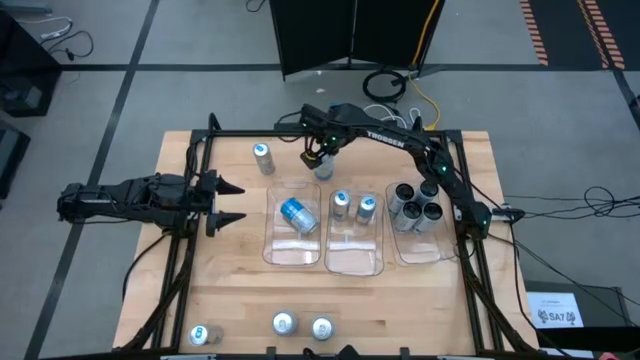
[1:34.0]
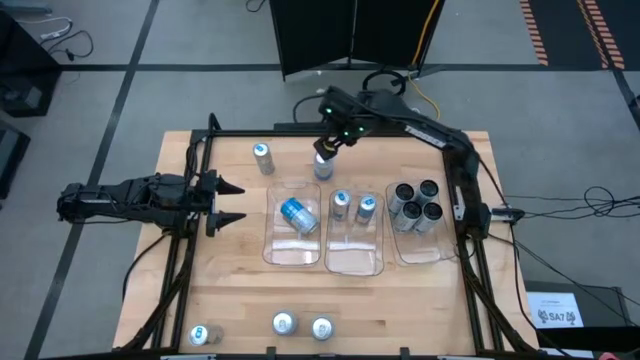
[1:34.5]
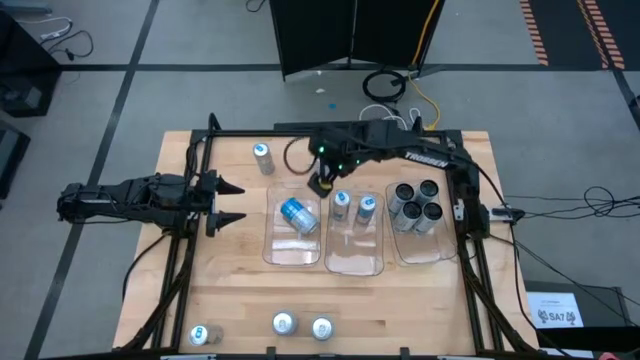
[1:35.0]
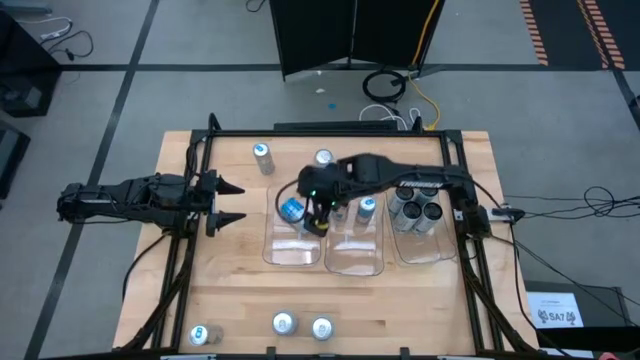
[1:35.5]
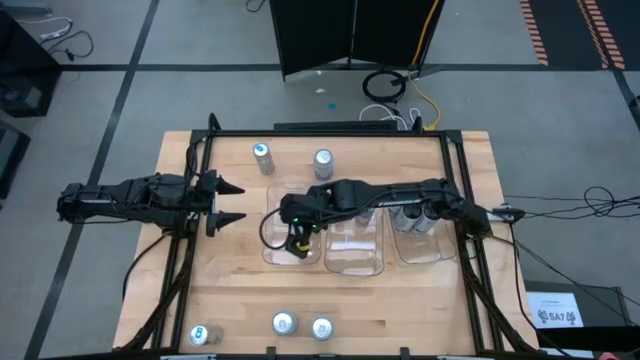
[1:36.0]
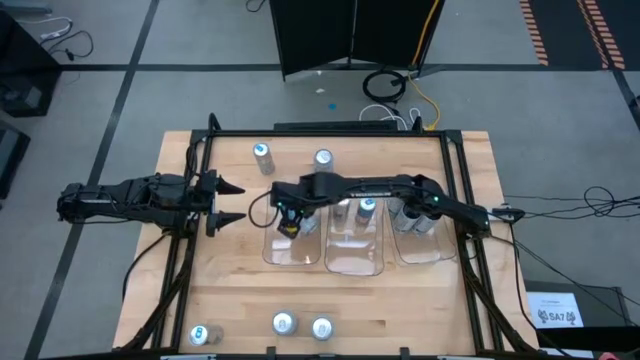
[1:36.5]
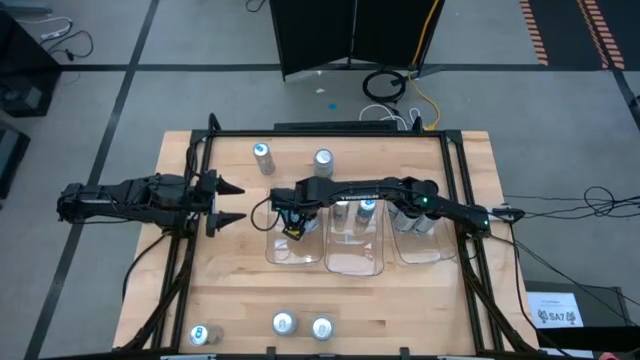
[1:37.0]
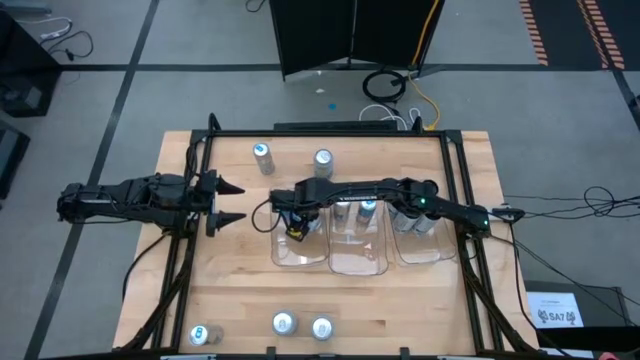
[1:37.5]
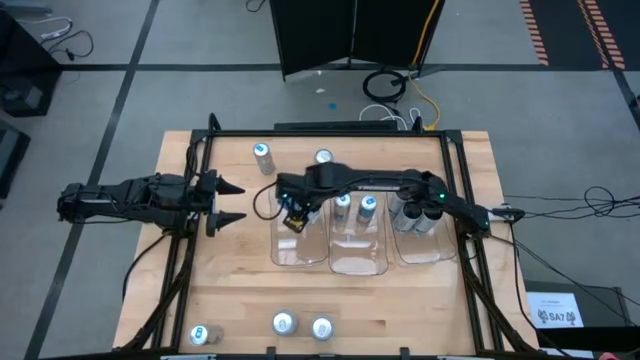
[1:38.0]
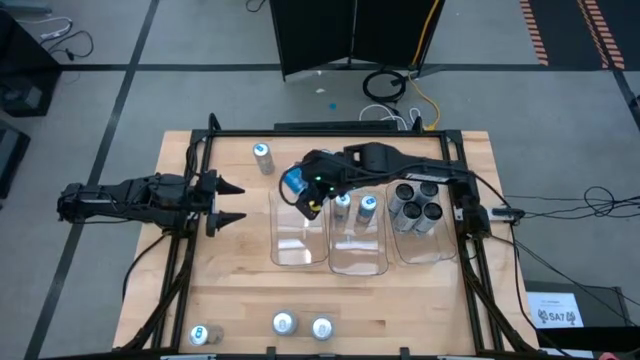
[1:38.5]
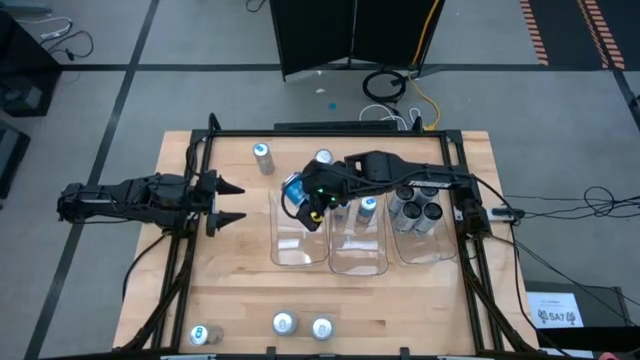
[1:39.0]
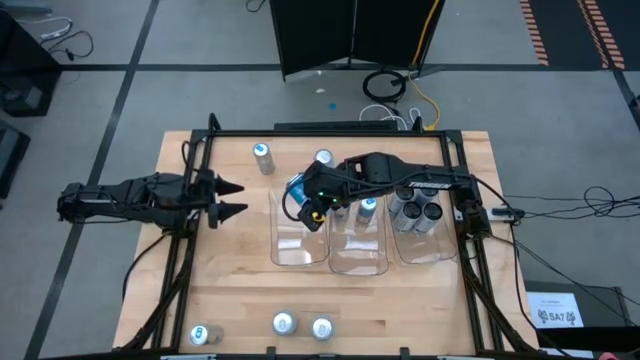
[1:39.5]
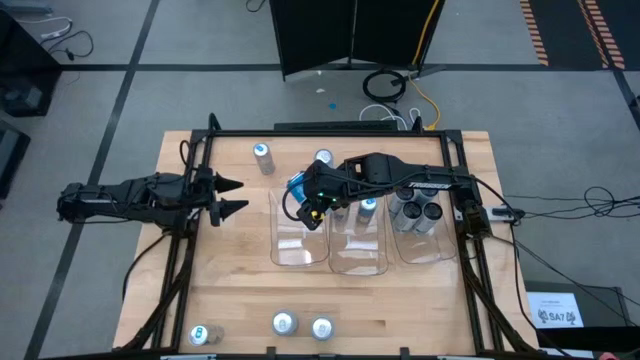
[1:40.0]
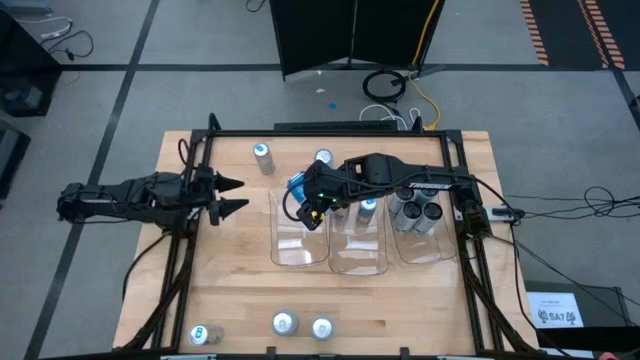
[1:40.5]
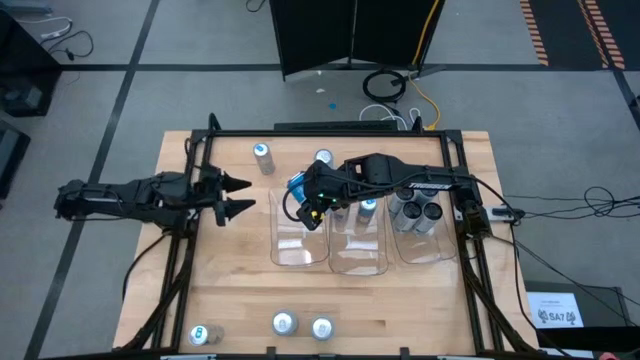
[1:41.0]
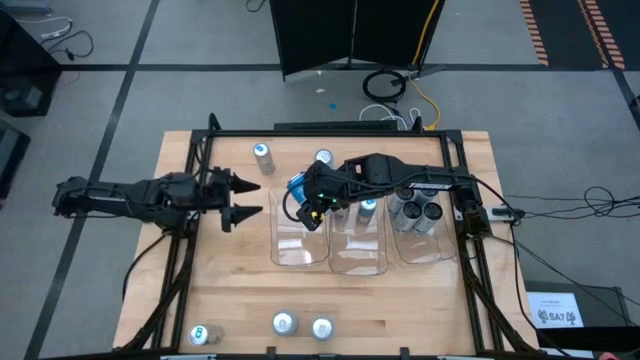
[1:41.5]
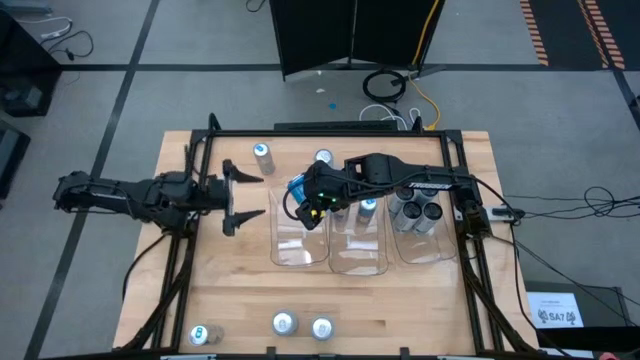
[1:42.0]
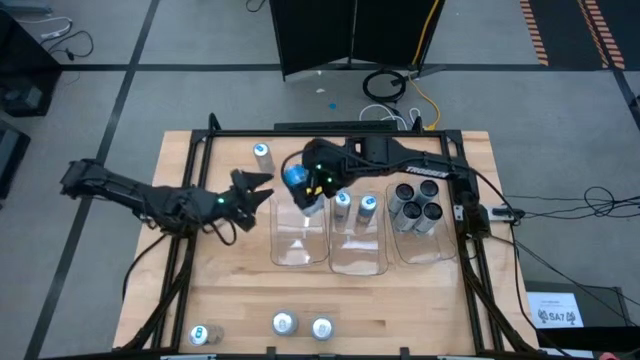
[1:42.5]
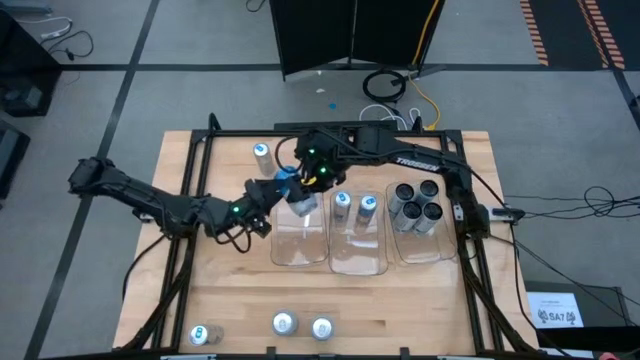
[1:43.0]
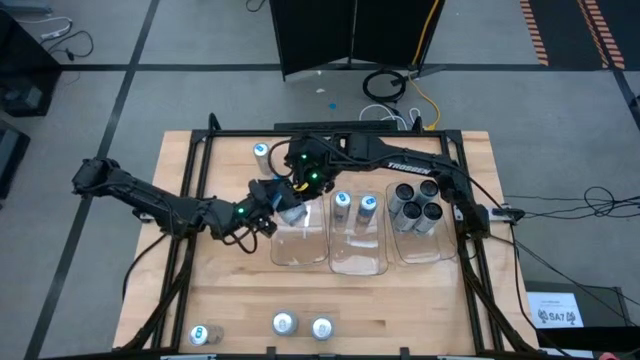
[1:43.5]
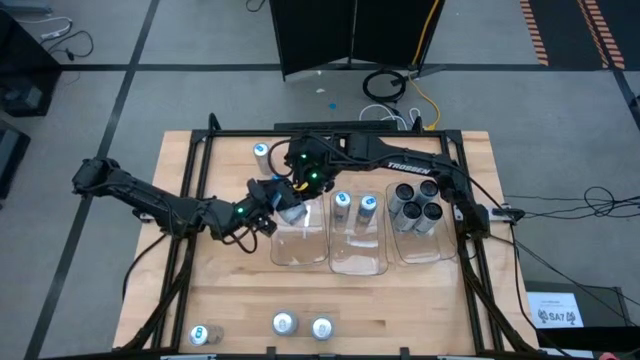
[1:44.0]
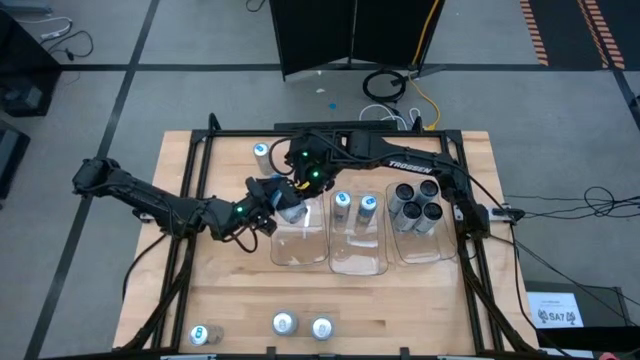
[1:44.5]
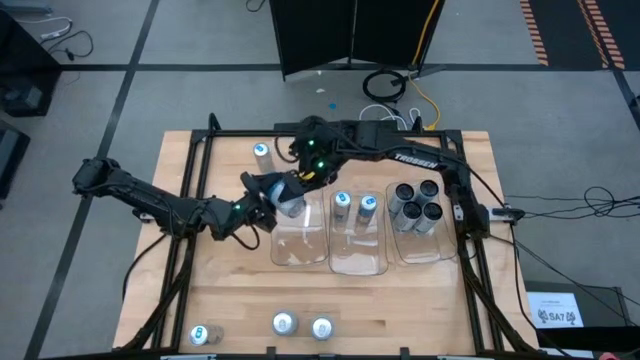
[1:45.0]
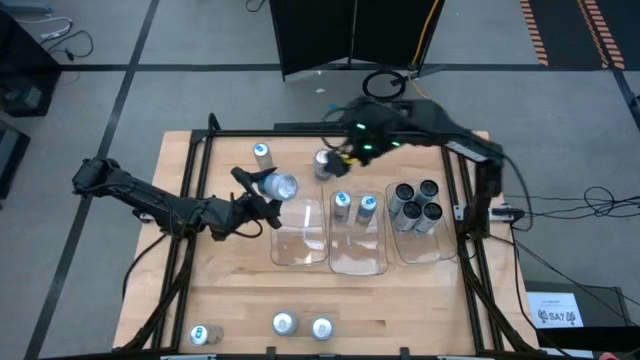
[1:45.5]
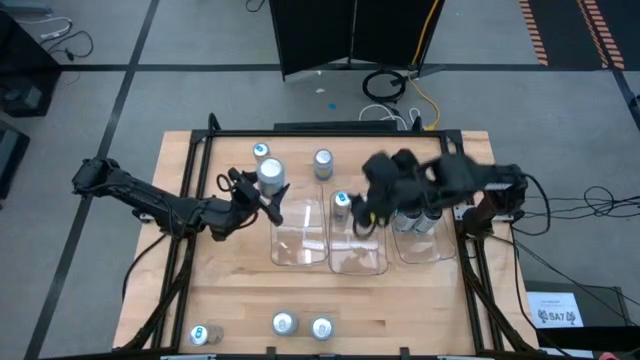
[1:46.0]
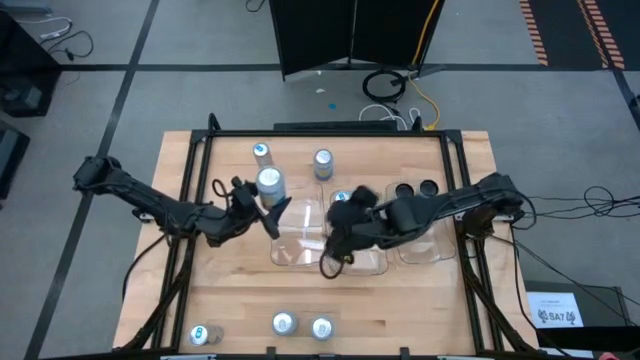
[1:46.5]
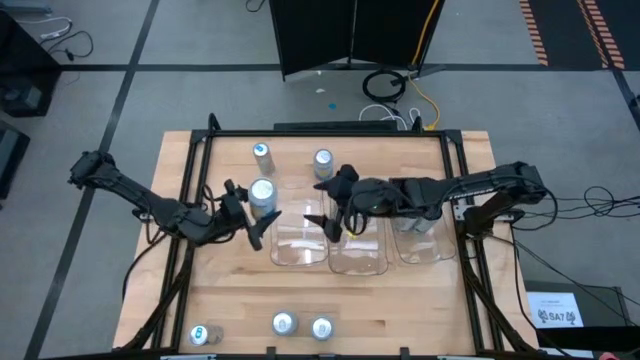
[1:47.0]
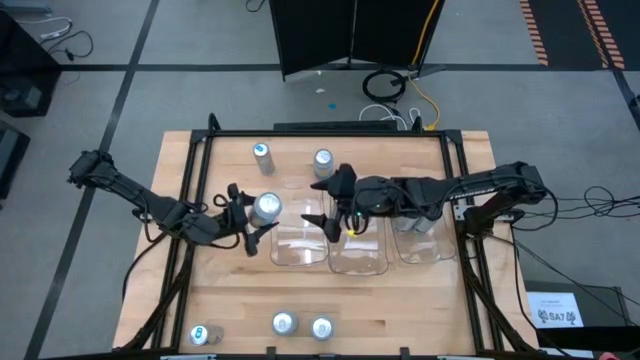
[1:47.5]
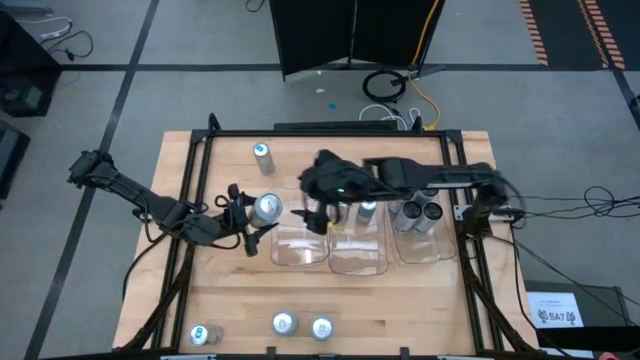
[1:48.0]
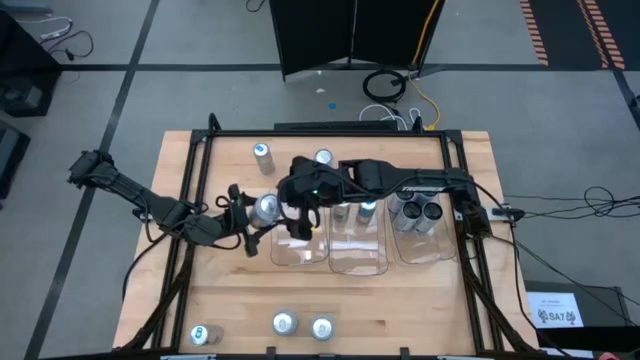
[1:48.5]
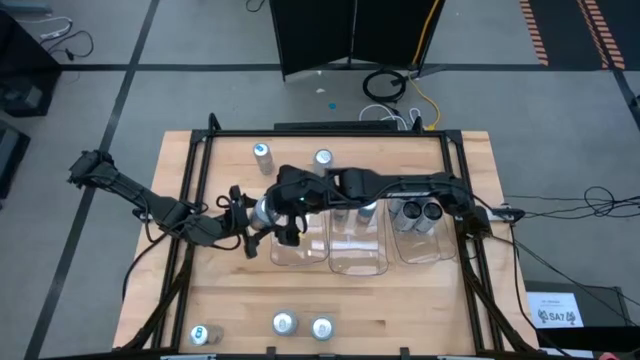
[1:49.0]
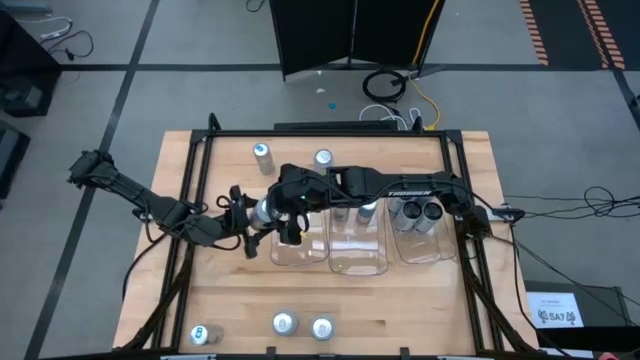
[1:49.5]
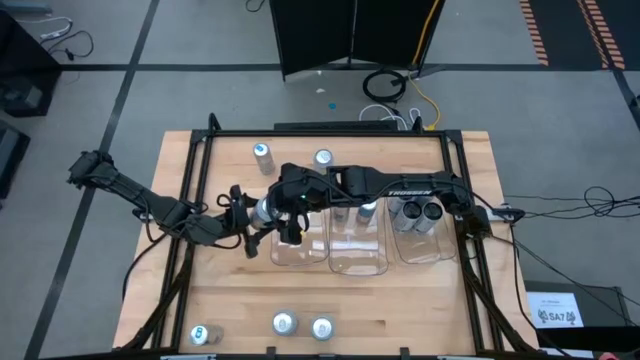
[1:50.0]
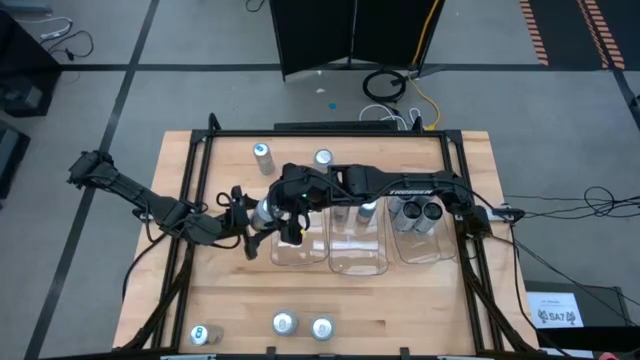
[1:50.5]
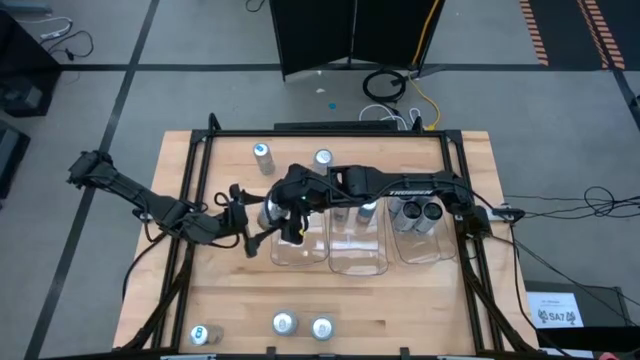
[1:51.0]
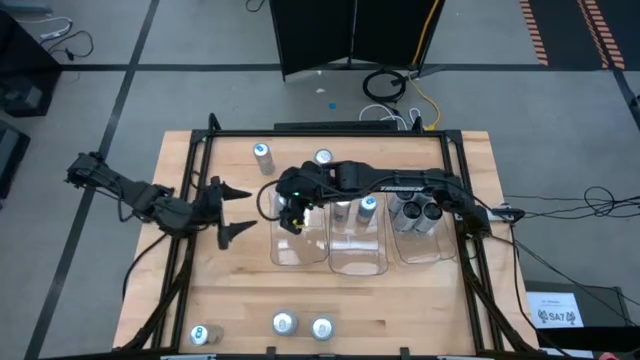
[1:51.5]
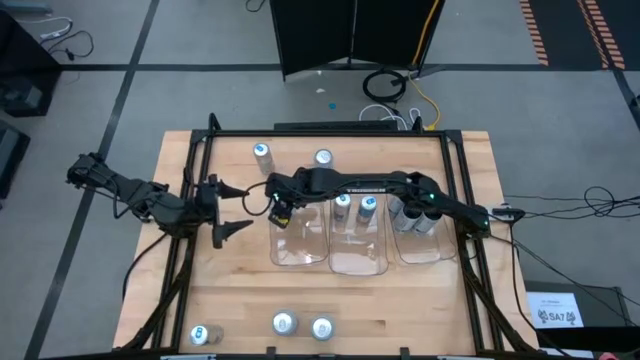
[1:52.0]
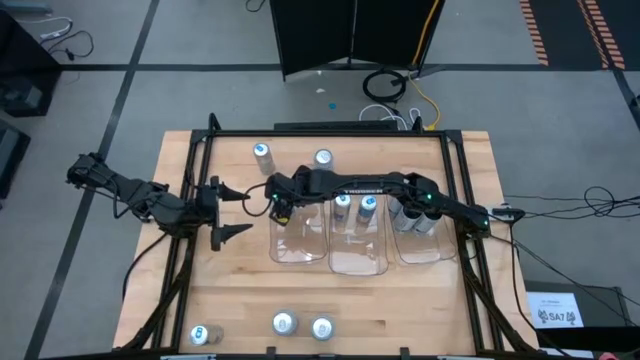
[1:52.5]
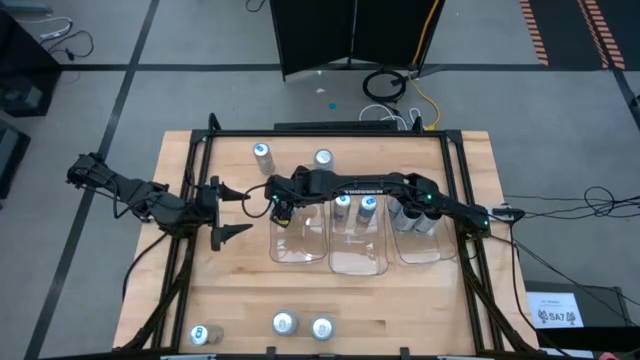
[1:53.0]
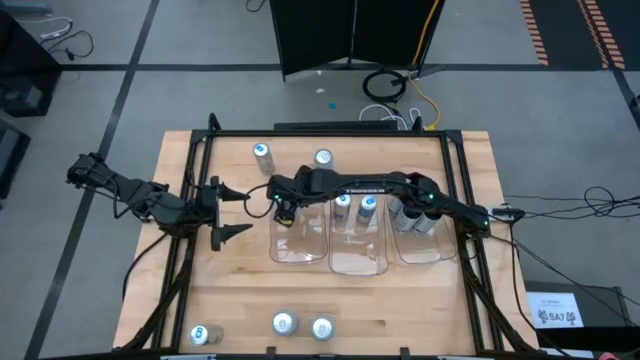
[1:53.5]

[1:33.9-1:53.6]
Task: Sort soda cans
Adjust the blue-white soda can in the left transparent bin

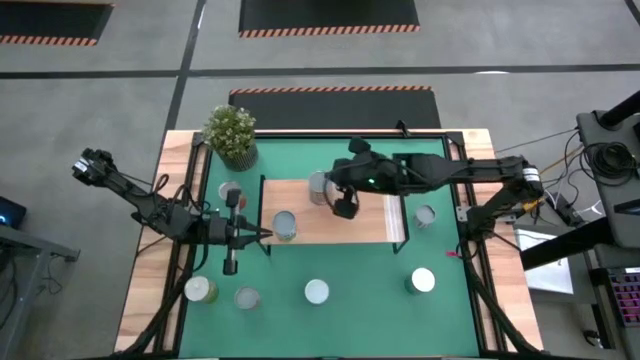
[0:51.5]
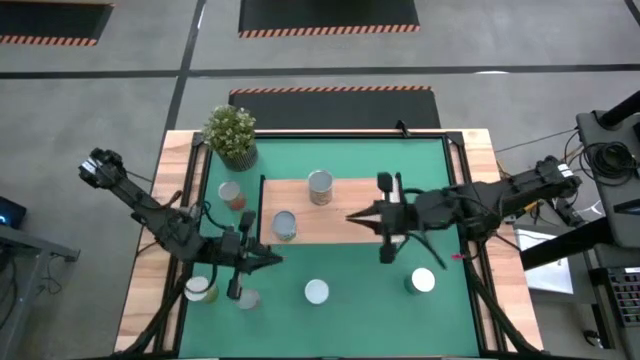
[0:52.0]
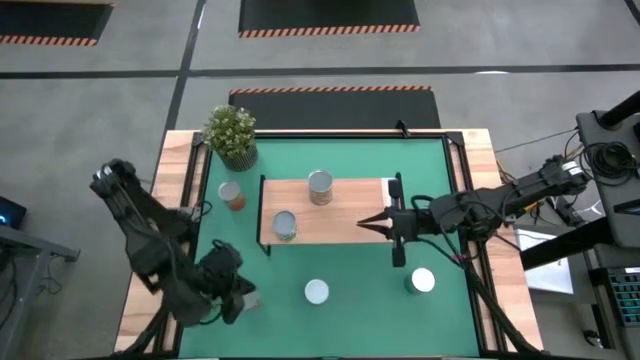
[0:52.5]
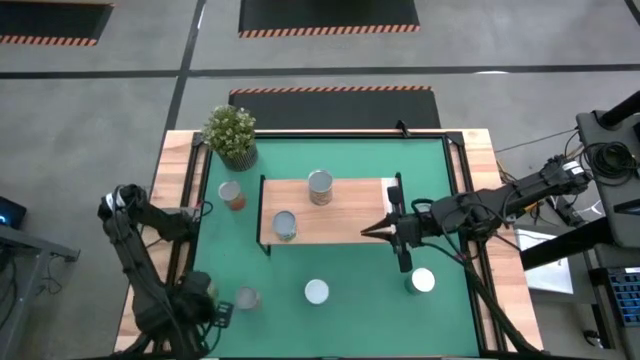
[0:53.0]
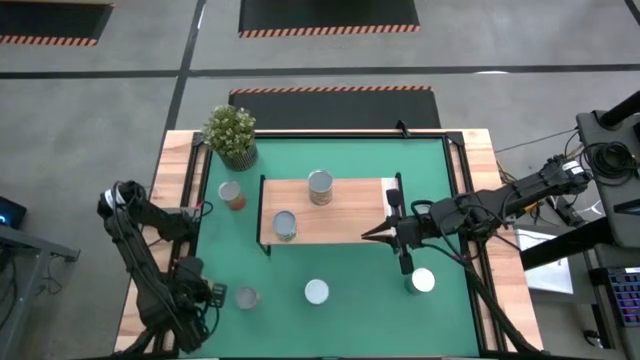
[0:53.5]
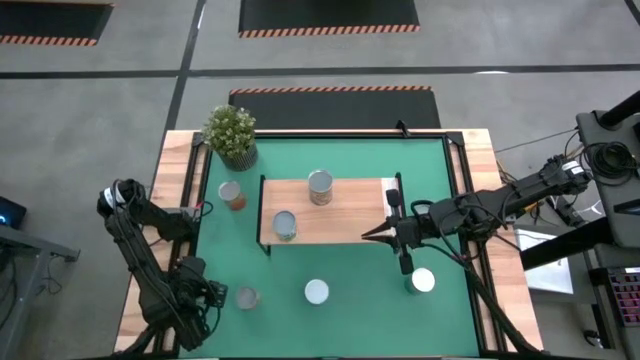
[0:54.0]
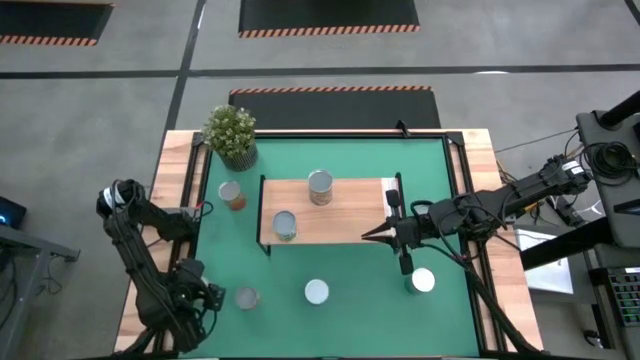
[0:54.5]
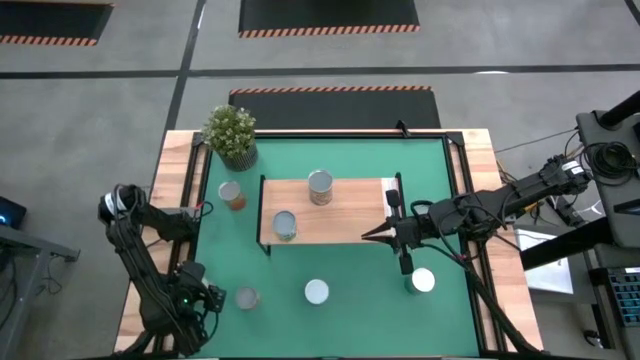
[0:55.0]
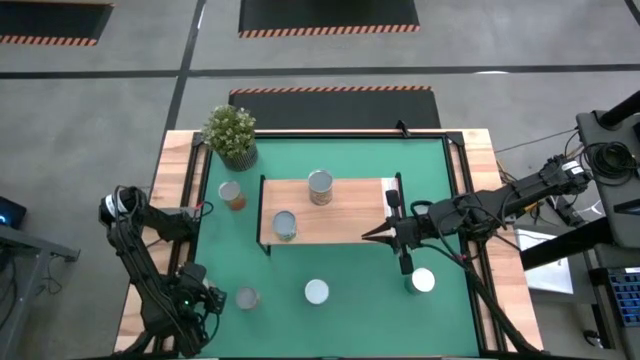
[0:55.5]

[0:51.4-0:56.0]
Task: Pick and place cans onto a shelf
Put the canned of oranges on the shelf
